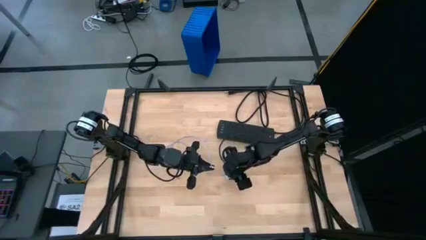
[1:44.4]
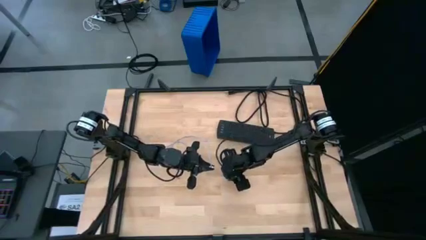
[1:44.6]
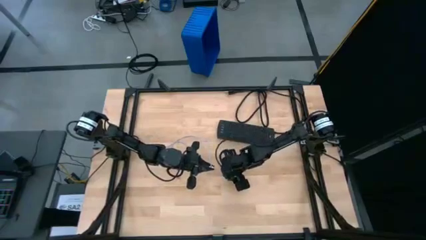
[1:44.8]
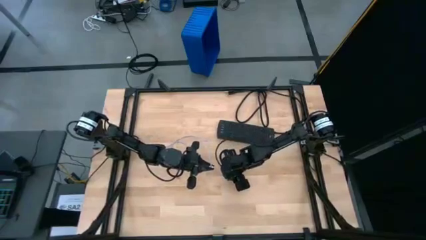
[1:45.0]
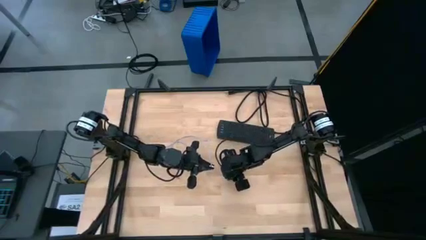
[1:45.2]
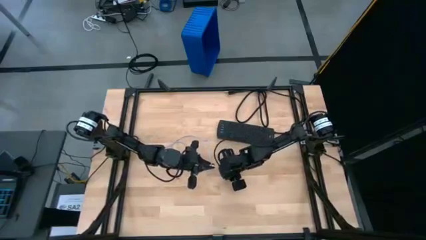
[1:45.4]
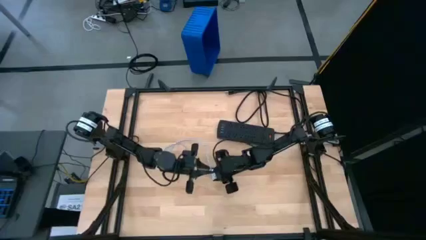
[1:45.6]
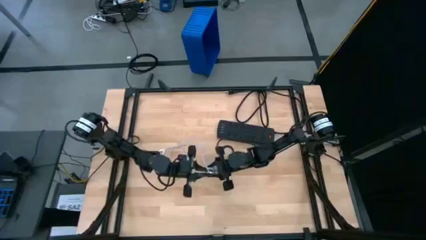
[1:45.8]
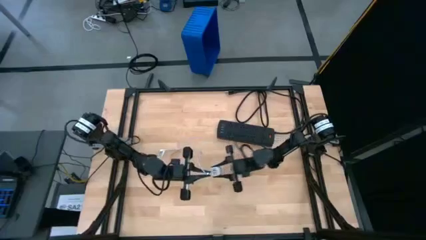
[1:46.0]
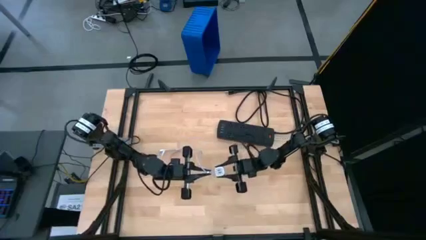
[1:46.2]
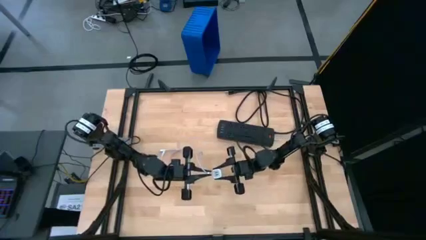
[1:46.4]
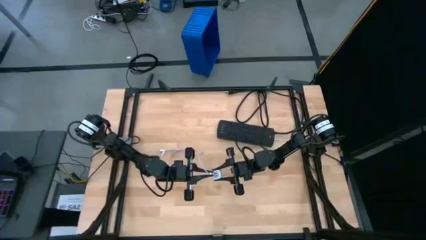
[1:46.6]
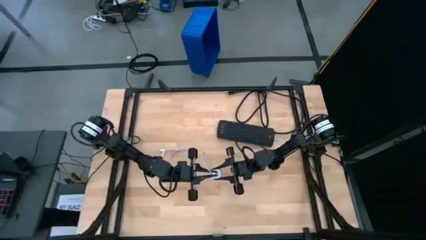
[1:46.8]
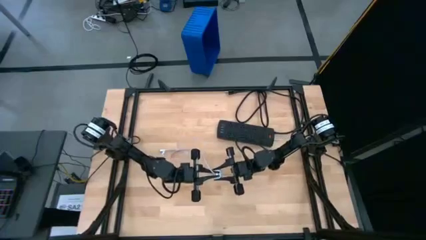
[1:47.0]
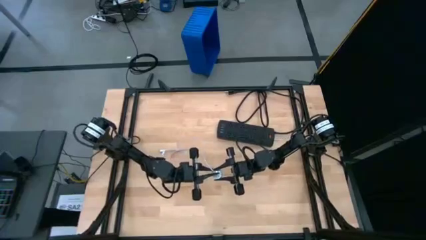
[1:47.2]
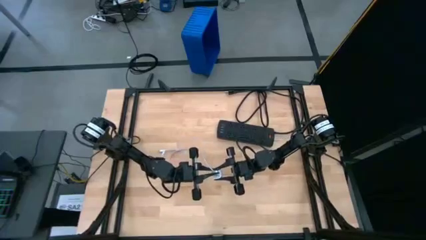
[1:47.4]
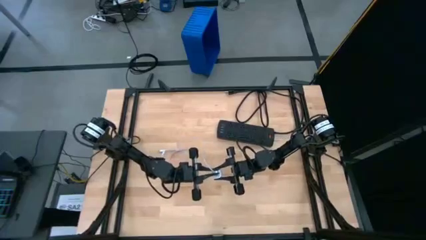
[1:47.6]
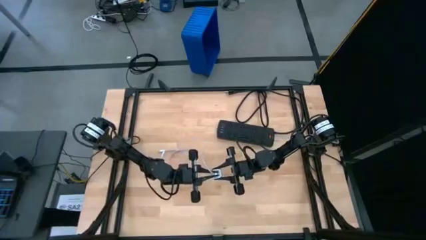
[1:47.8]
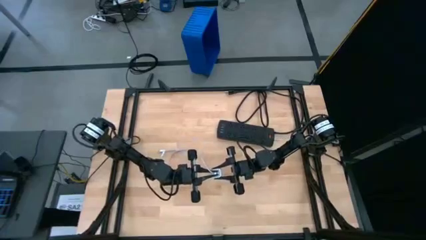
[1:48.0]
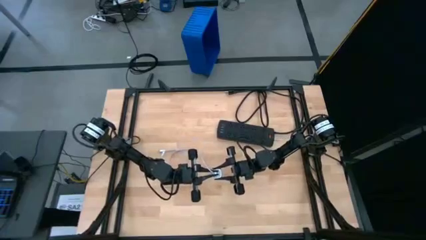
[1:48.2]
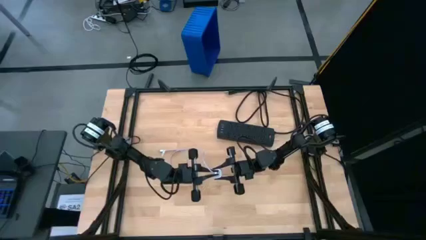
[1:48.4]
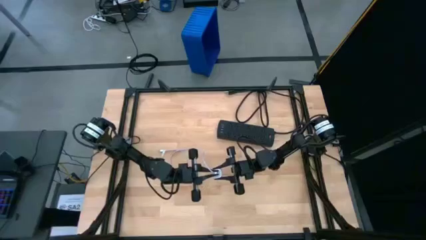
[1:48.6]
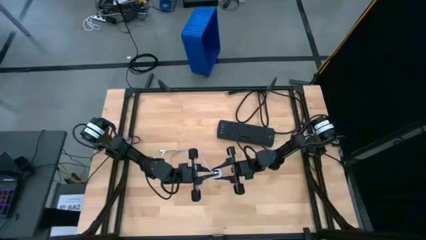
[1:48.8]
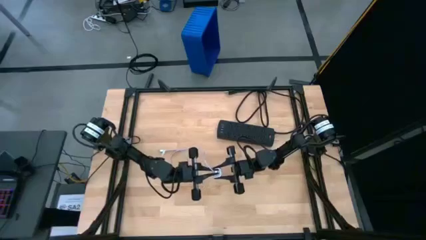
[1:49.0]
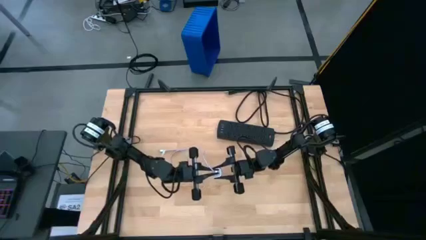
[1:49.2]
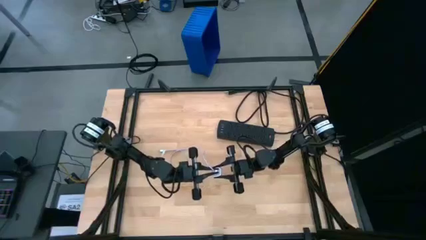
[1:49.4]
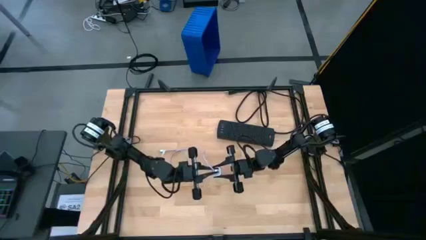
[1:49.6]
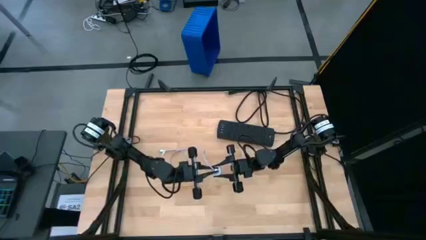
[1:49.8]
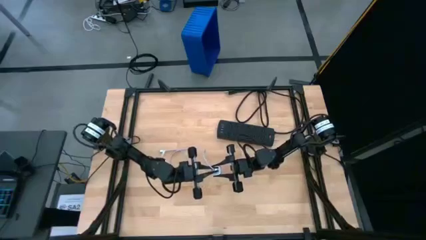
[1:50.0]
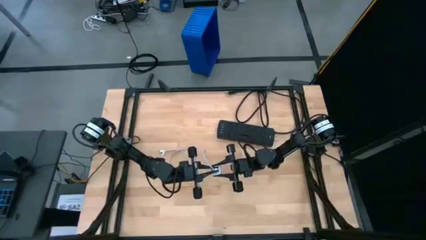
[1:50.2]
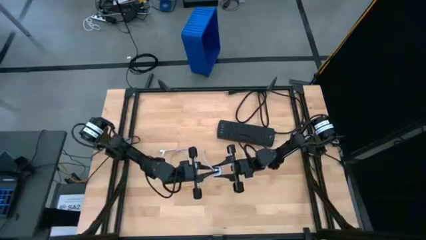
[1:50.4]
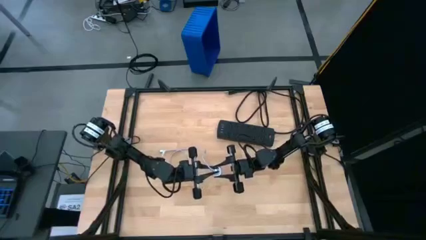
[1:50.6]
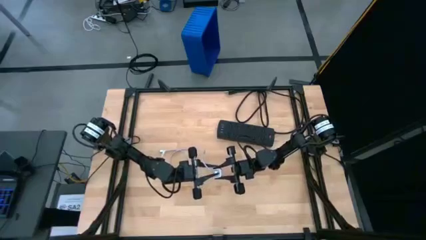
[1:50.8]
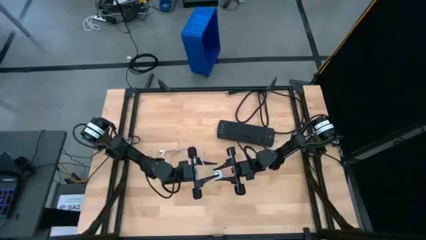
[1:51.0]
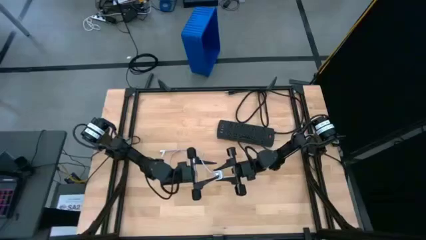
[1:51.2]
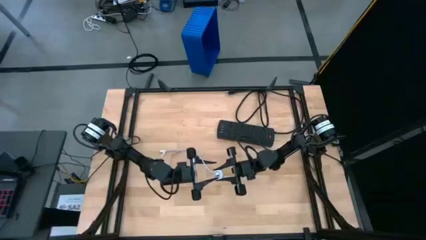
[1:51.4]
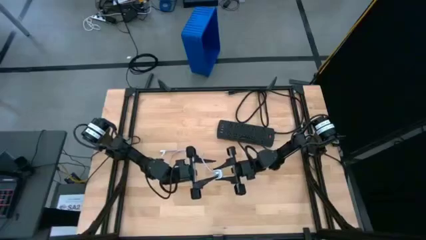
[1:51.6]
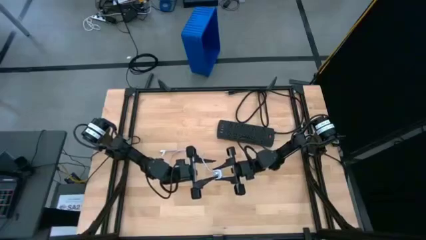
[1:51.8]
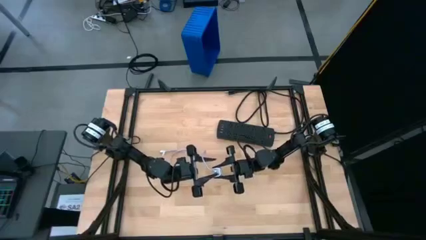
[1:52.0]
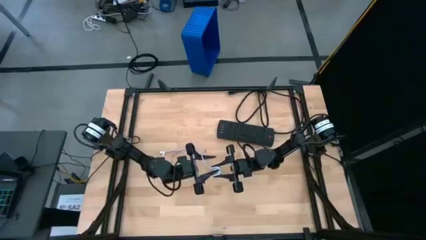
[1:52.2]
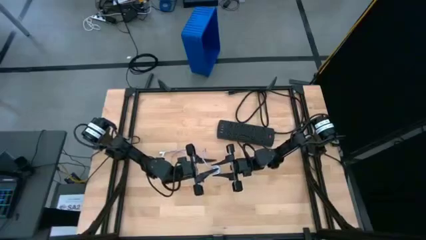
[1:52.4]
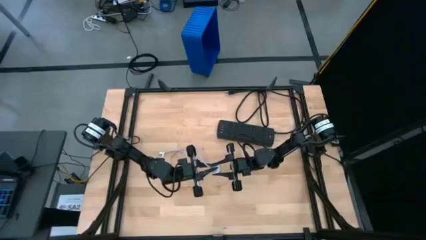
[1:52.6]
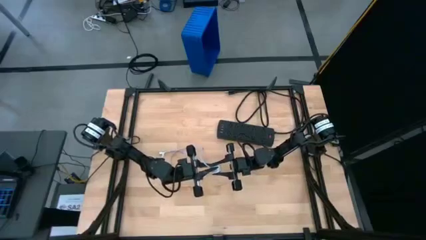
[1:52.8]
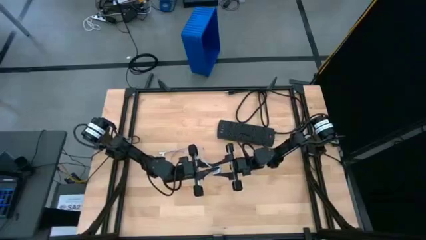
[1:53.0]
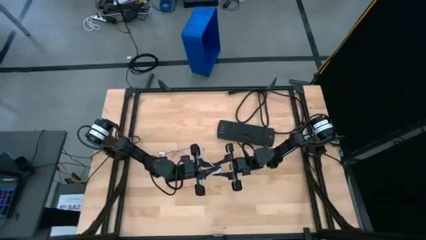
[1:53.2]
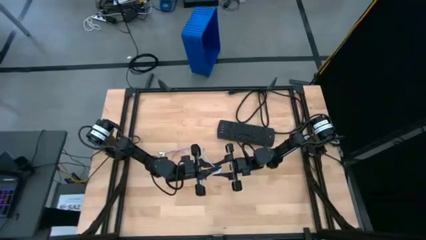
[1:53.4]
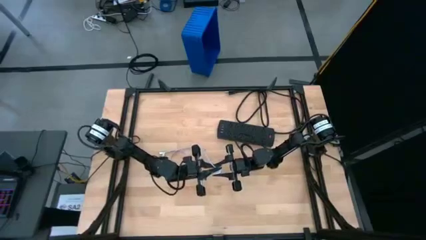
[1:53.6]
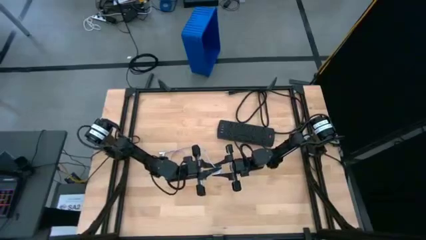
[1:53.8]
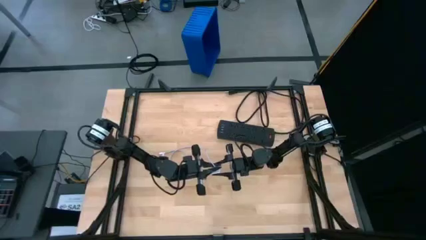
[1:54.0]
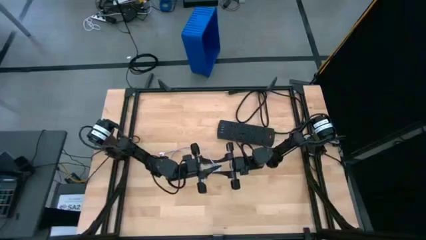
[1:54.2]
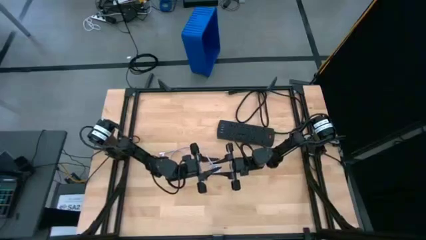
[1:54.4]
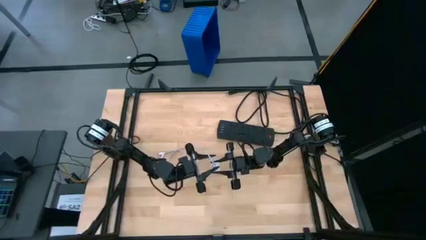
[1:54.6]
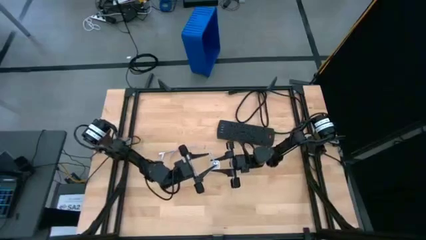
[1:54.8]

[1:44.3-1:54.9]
Task: Insert USB
Insert the white charger cable into the white charger adapter

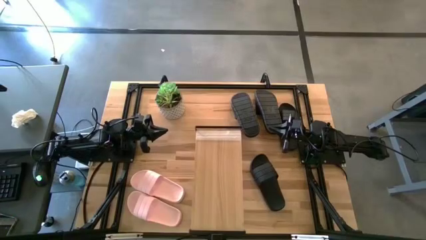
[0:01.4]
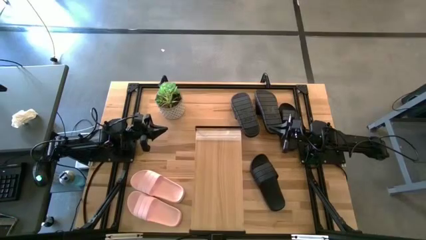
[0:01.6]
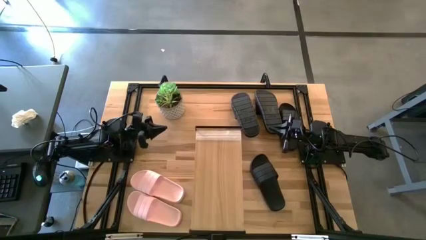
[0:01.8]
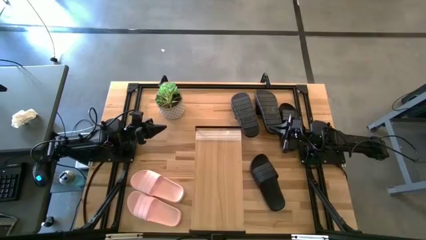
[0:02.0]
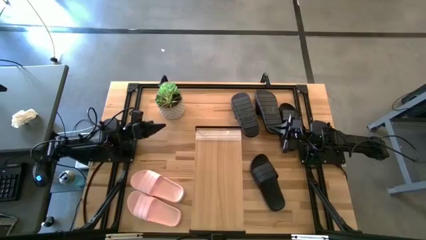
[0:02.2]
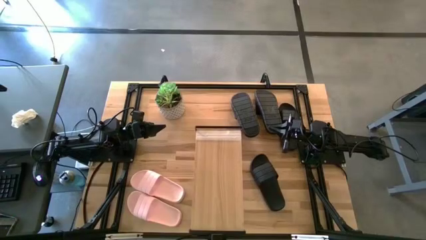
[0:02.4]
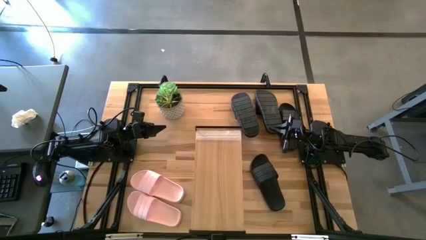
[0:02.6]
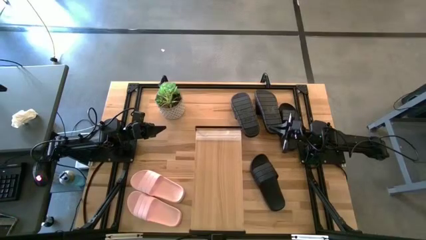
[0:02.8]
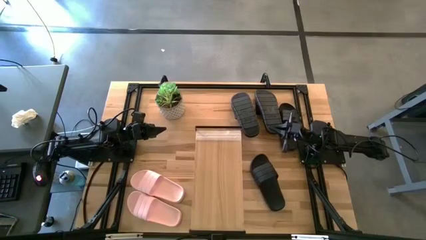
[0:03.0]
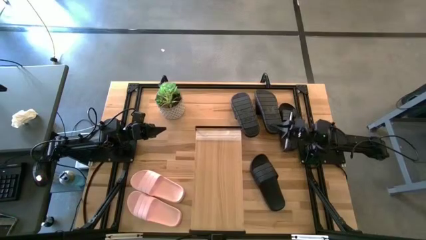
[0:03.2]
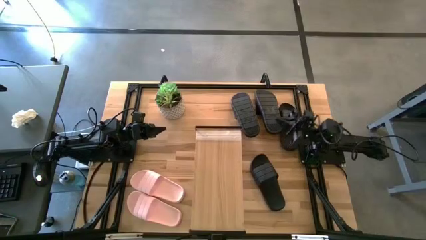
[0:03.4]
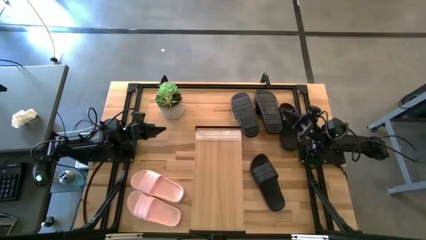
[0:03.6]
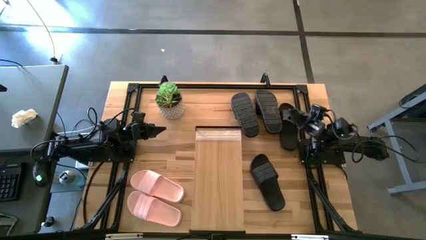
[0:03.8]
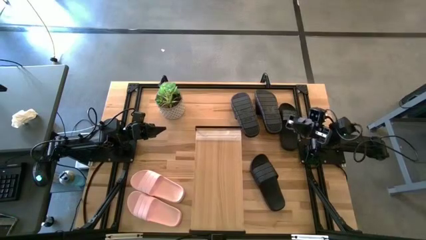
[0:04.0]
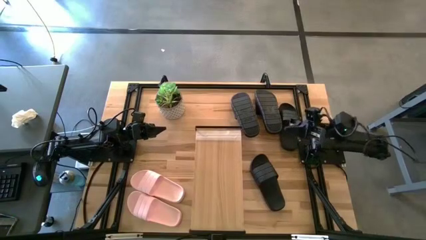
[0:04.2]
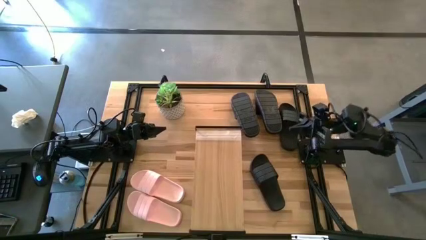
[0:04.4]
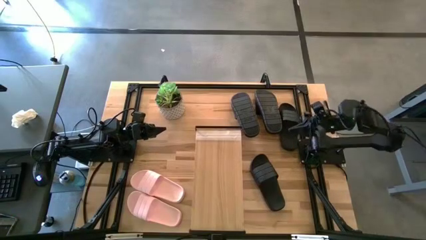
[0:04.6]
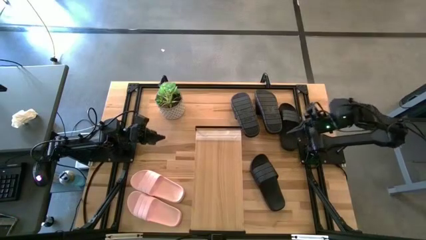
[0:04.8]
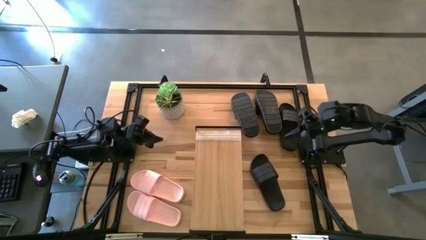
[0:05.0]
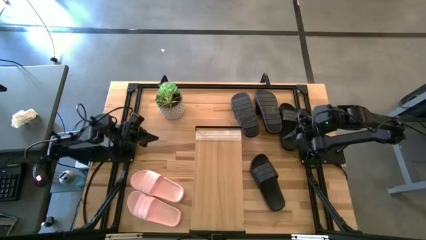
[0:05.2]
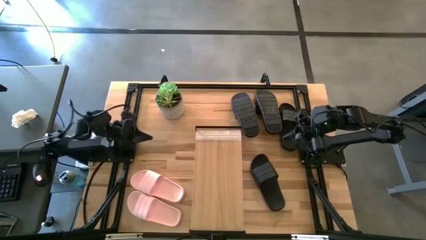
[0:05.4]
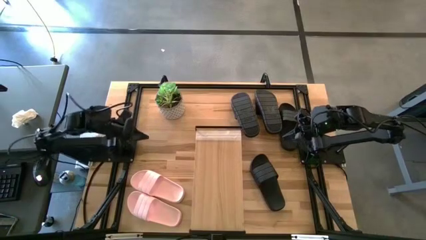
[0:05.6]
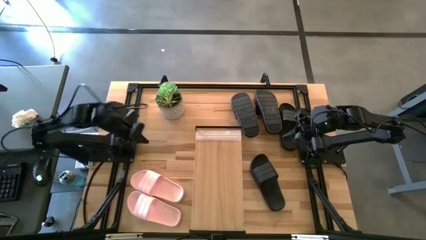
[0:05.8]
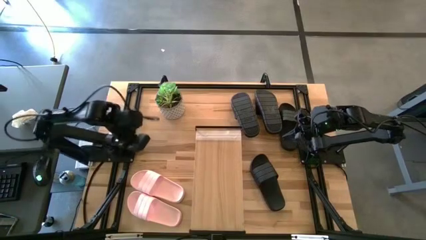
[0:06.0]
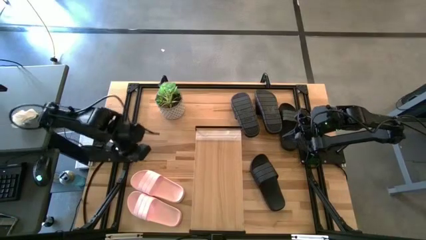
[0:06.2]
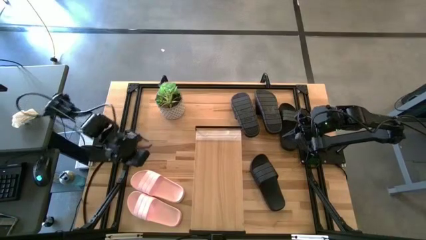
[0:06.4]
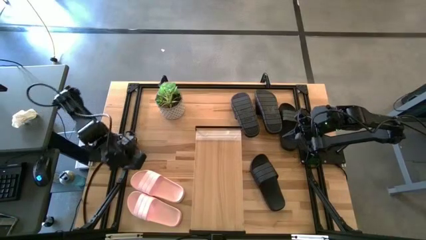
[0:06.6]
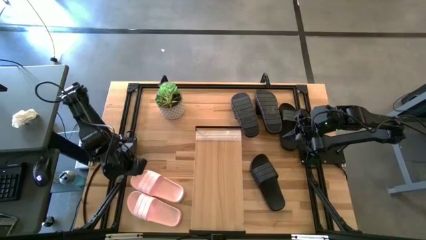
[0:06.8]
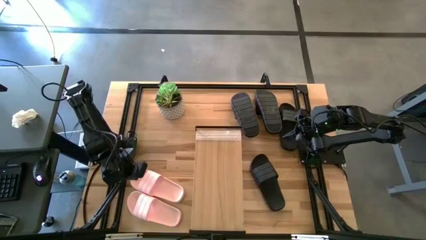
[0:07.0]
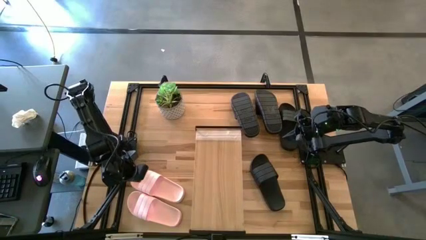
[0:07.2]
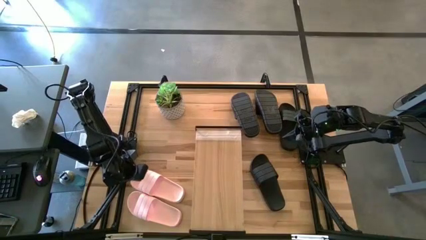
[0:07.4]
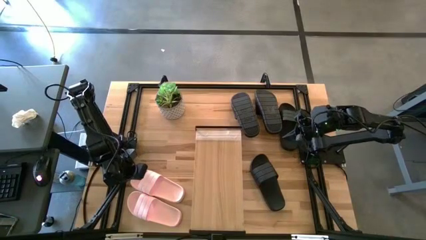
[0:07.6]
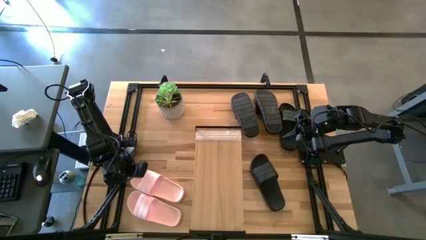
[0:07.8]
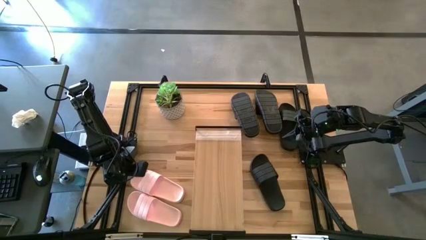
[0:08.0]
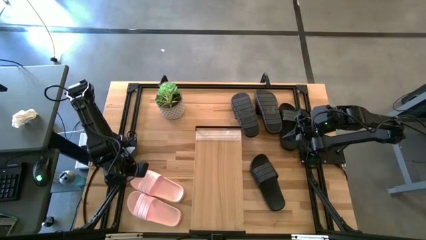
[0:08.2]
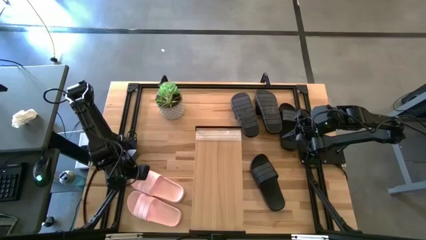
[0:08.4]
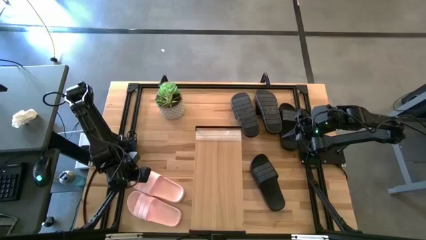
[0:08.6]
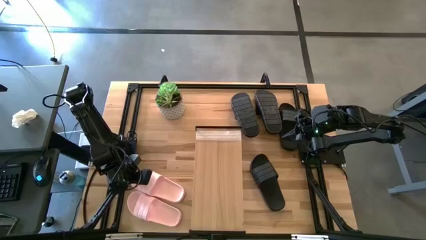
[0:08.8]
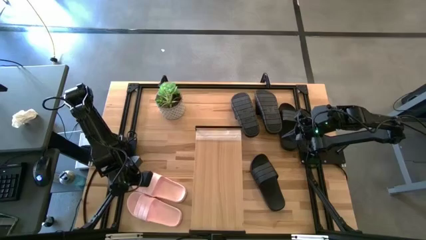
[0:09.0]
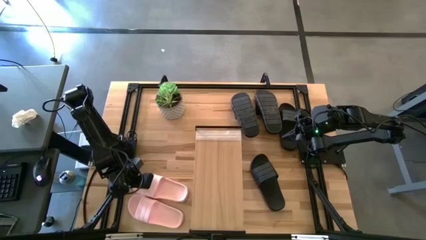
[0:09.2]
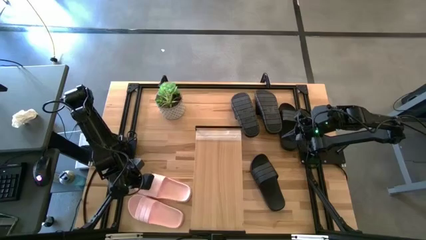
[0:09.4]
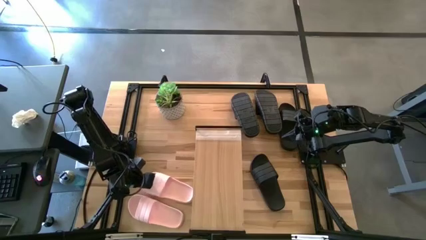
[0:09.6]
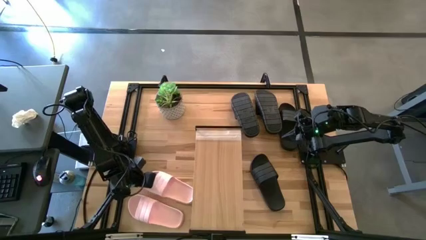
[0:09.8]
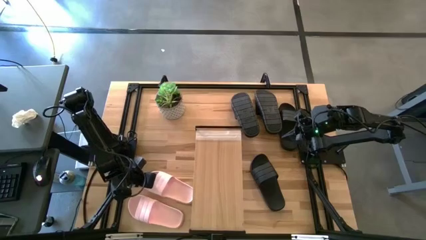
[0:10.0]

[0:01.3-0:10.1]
Task: Pick and place slides into the shelf
Put the top pink slipper on the shelf
